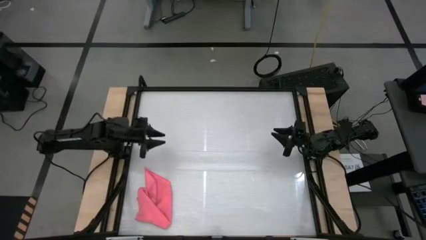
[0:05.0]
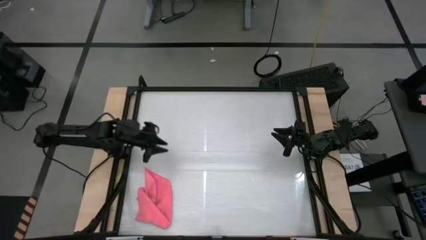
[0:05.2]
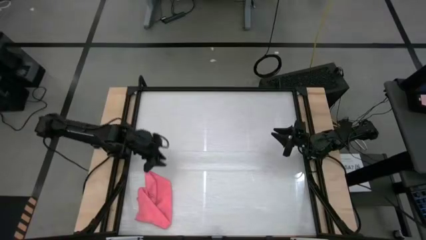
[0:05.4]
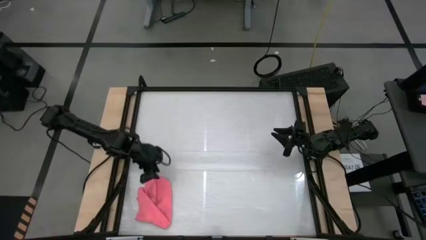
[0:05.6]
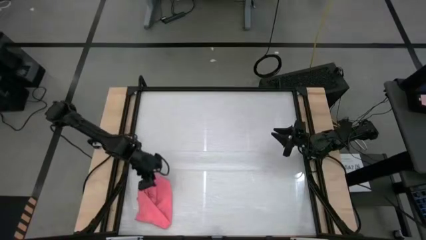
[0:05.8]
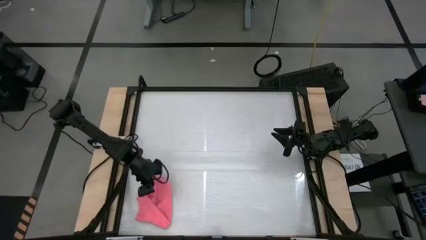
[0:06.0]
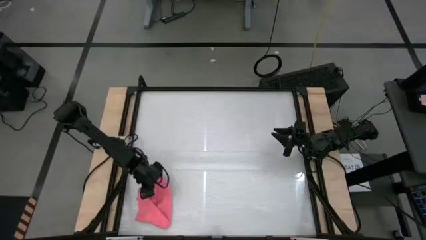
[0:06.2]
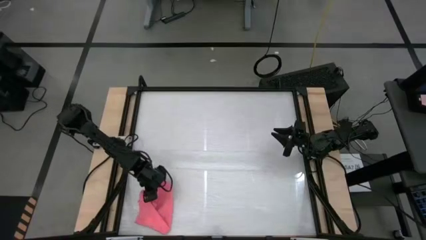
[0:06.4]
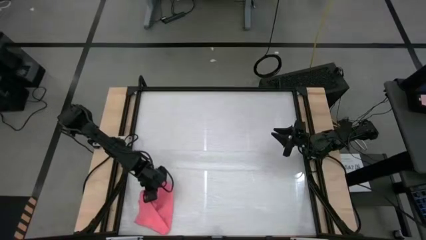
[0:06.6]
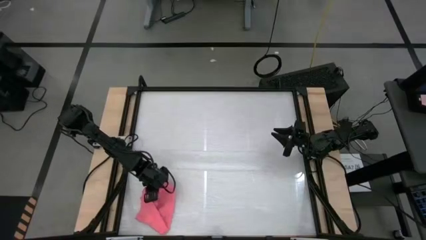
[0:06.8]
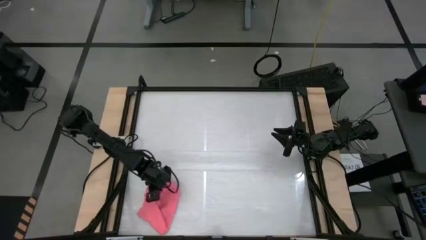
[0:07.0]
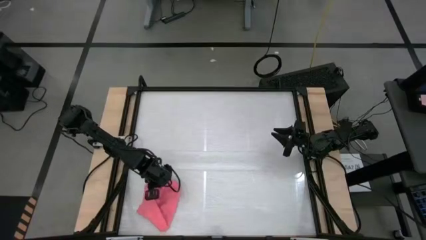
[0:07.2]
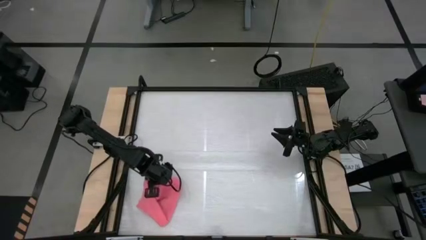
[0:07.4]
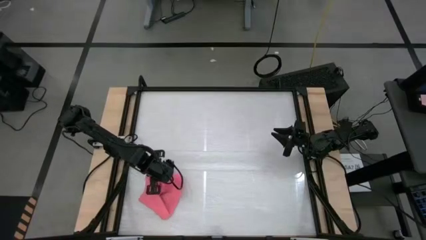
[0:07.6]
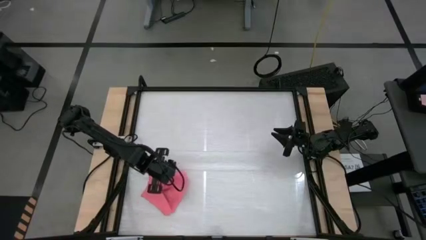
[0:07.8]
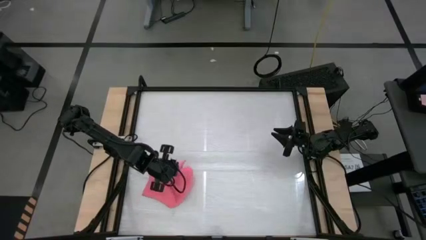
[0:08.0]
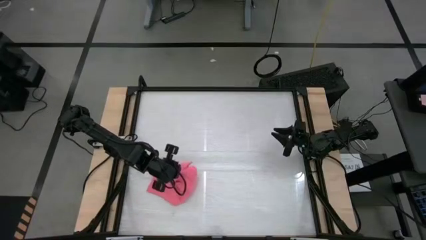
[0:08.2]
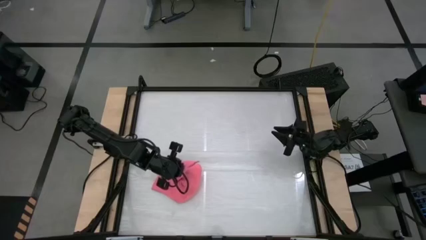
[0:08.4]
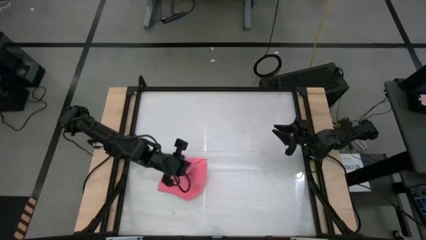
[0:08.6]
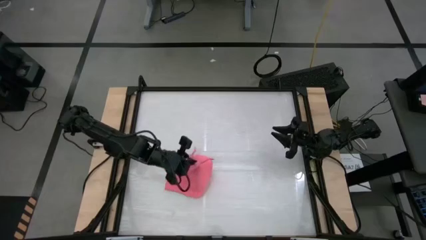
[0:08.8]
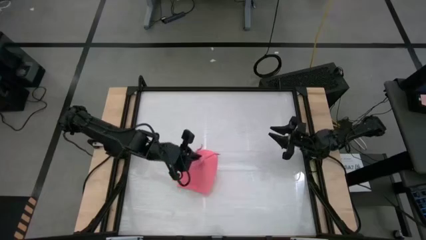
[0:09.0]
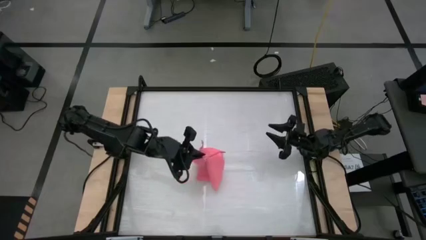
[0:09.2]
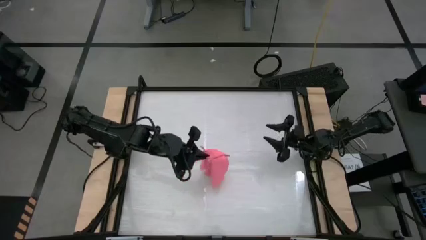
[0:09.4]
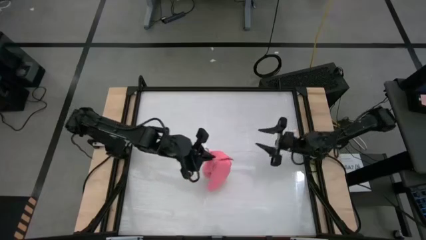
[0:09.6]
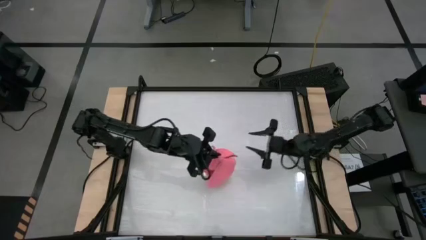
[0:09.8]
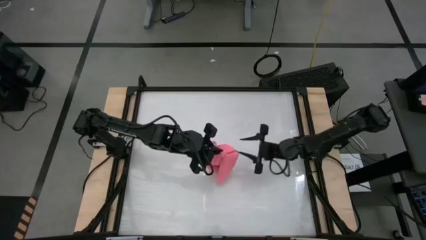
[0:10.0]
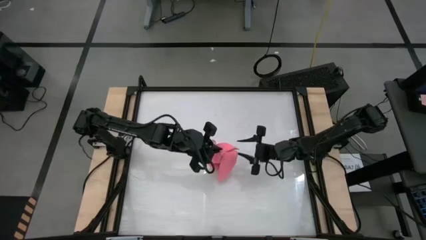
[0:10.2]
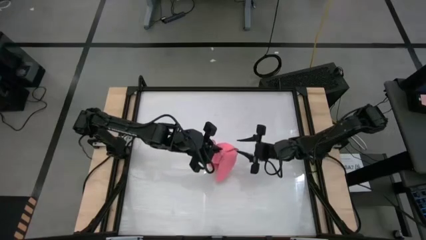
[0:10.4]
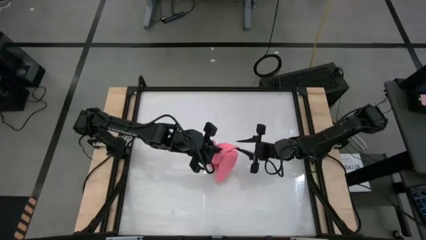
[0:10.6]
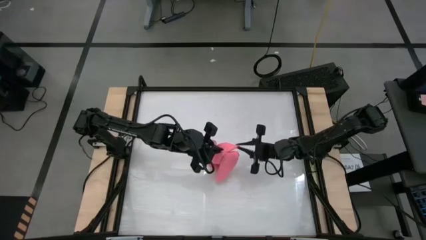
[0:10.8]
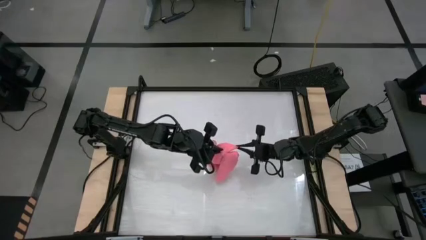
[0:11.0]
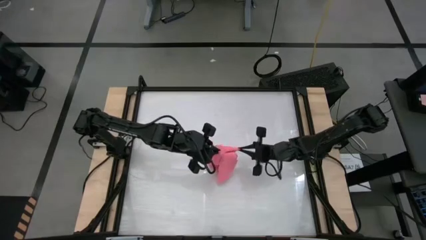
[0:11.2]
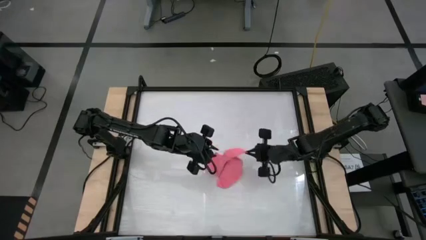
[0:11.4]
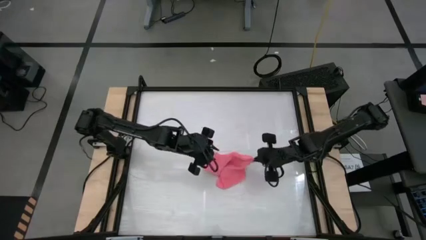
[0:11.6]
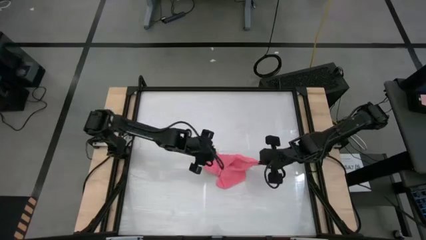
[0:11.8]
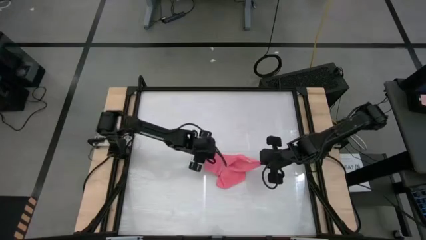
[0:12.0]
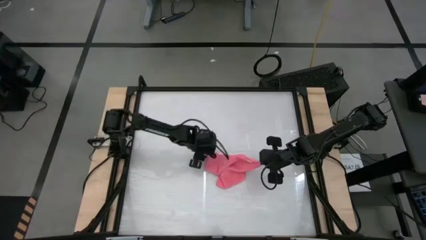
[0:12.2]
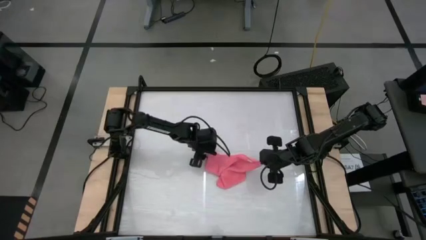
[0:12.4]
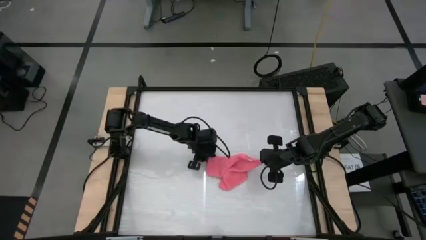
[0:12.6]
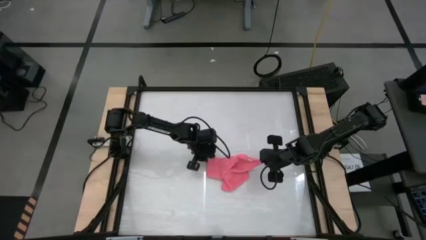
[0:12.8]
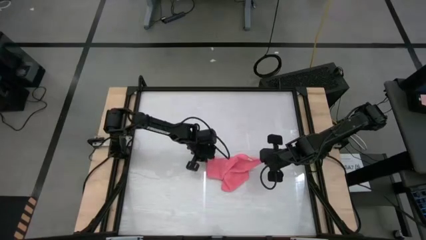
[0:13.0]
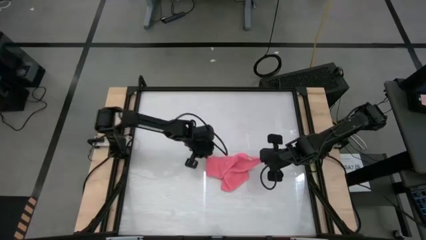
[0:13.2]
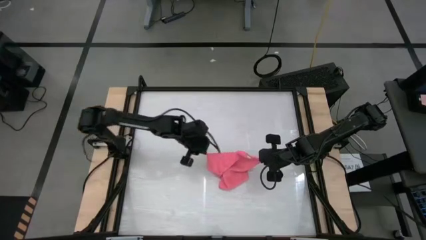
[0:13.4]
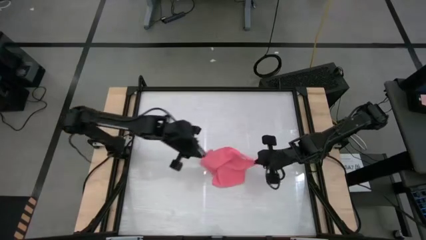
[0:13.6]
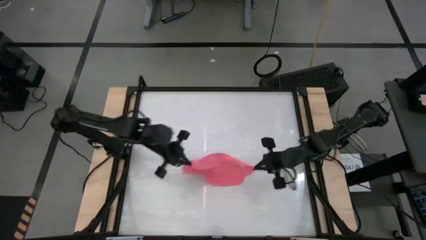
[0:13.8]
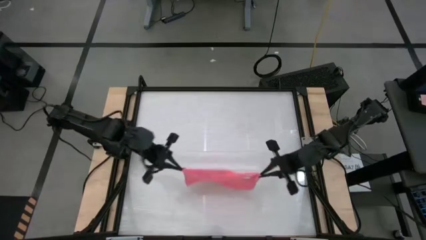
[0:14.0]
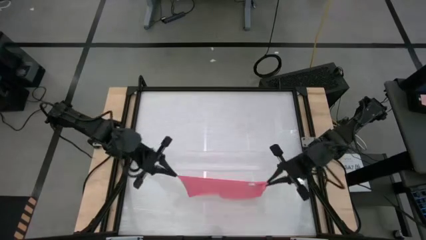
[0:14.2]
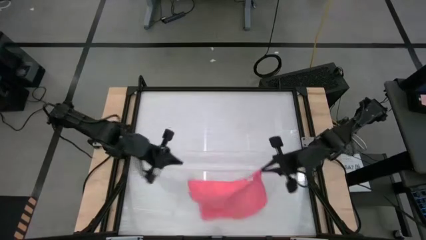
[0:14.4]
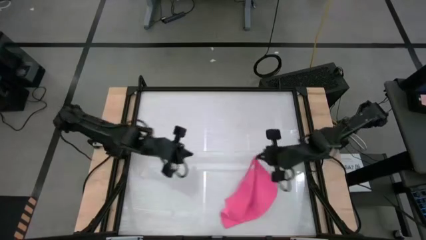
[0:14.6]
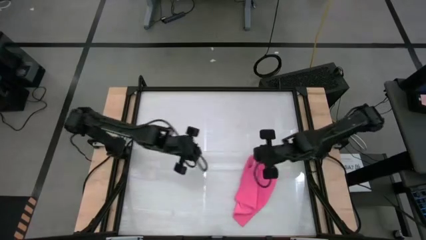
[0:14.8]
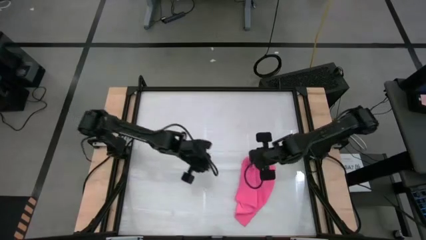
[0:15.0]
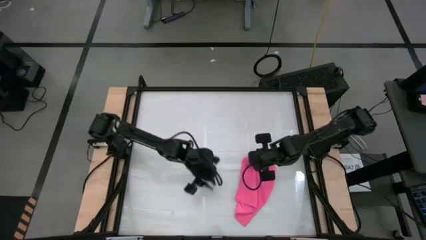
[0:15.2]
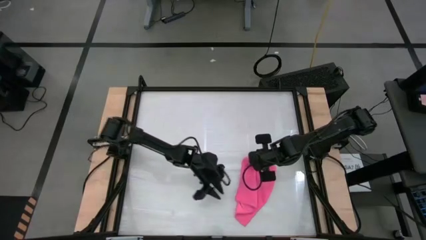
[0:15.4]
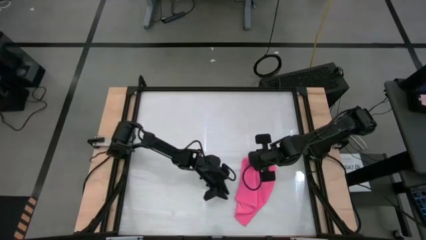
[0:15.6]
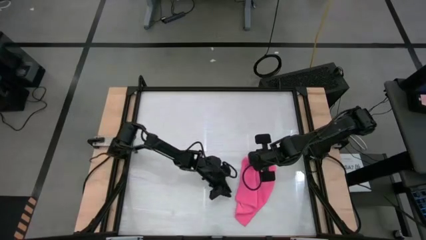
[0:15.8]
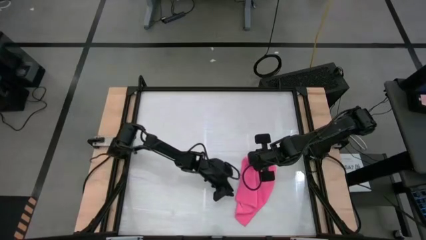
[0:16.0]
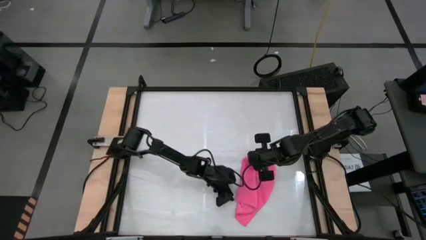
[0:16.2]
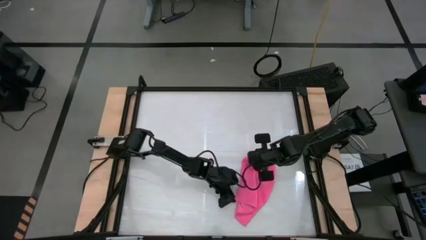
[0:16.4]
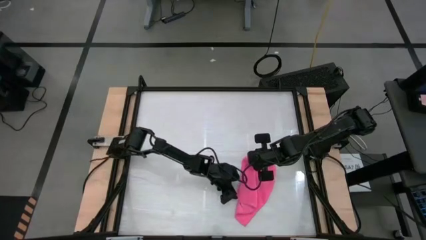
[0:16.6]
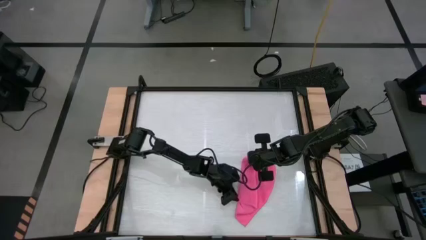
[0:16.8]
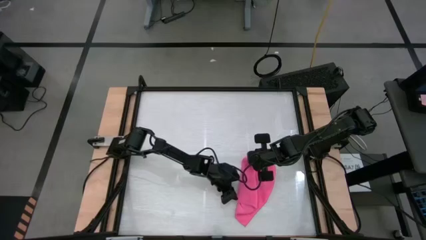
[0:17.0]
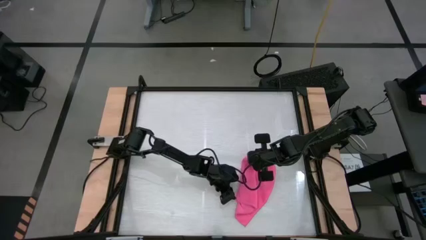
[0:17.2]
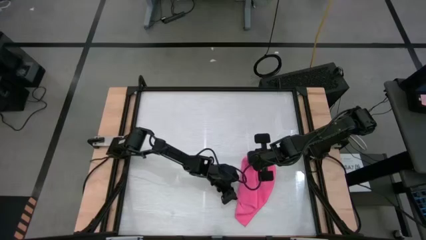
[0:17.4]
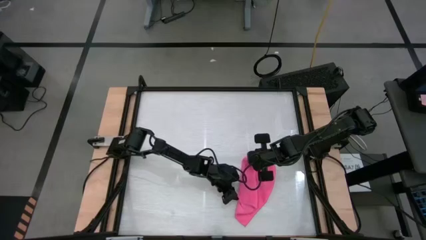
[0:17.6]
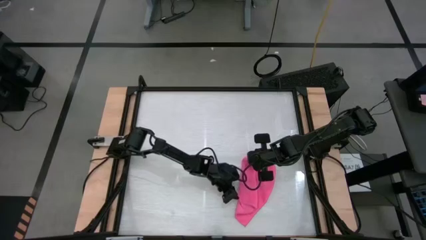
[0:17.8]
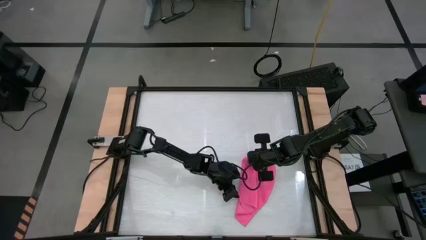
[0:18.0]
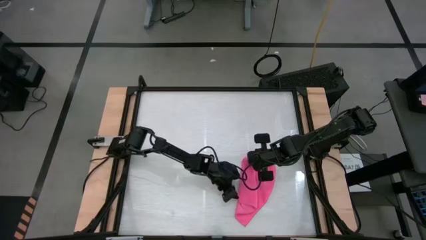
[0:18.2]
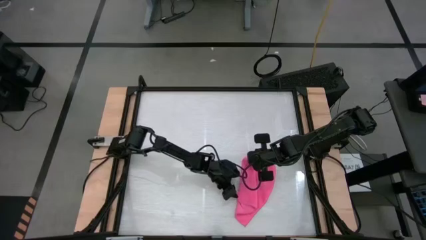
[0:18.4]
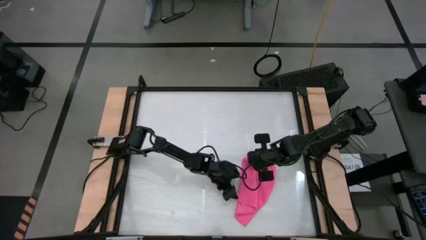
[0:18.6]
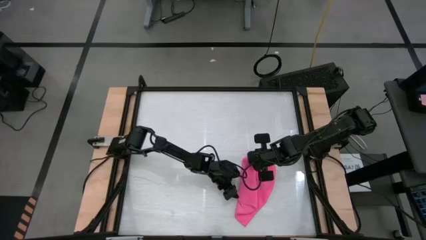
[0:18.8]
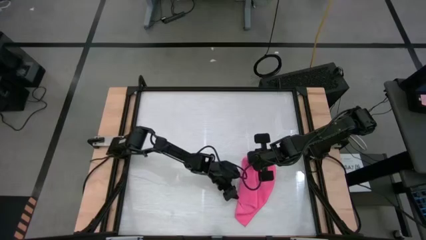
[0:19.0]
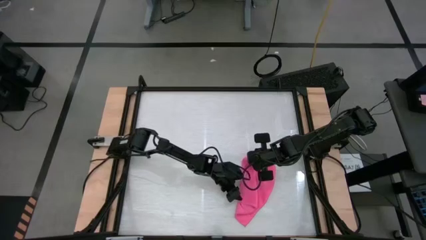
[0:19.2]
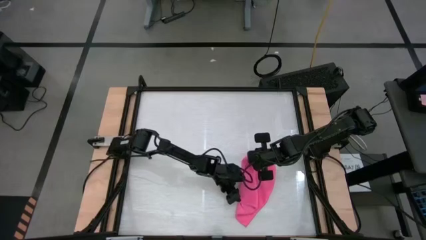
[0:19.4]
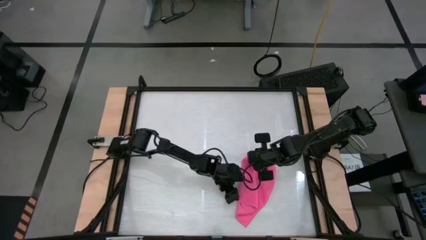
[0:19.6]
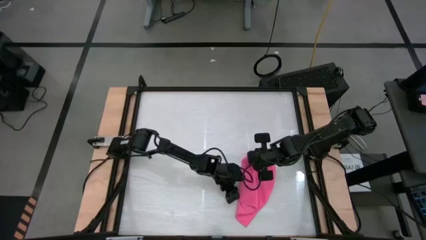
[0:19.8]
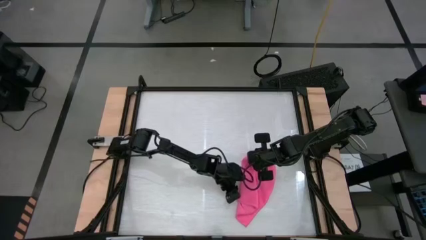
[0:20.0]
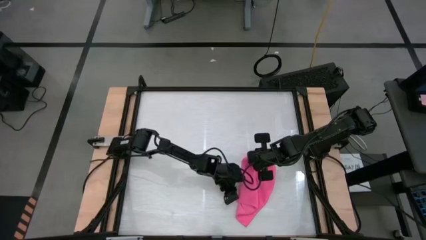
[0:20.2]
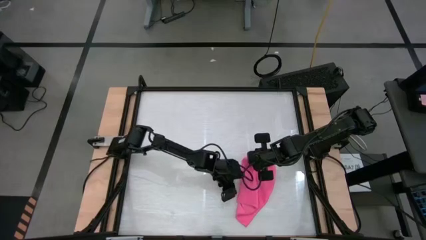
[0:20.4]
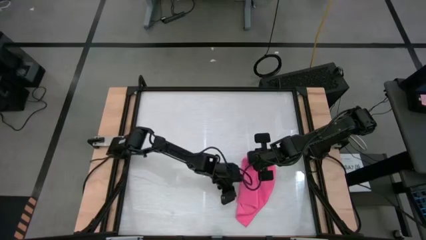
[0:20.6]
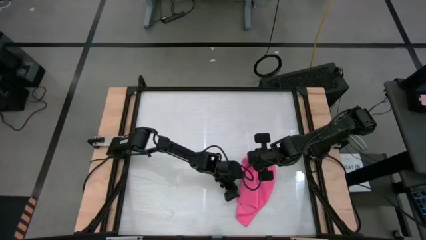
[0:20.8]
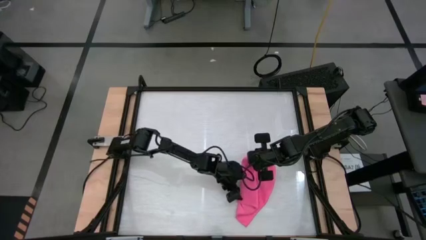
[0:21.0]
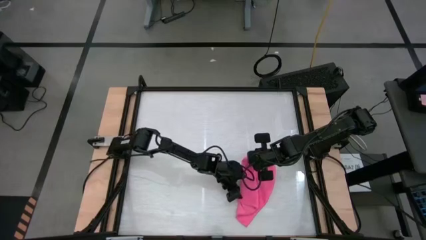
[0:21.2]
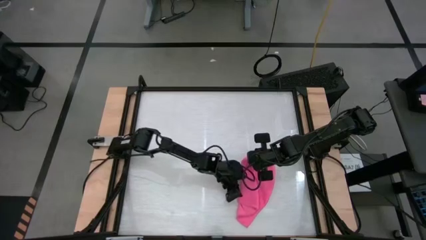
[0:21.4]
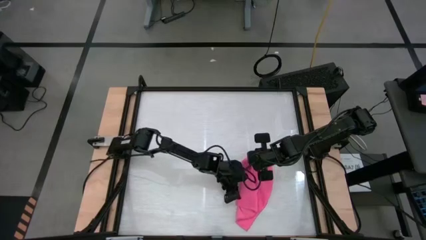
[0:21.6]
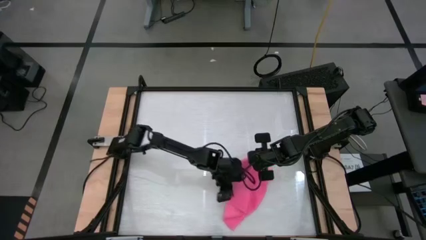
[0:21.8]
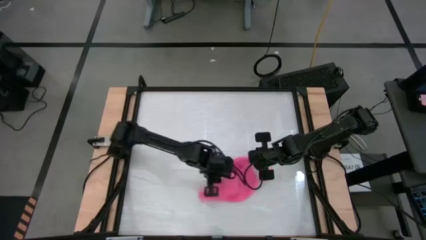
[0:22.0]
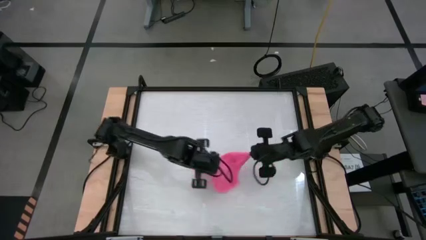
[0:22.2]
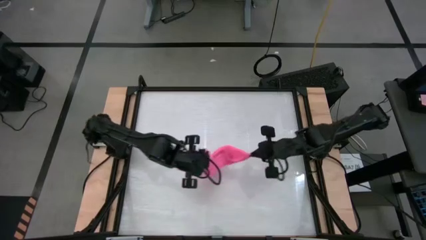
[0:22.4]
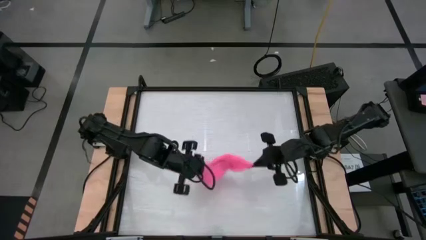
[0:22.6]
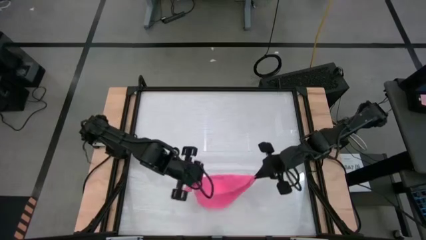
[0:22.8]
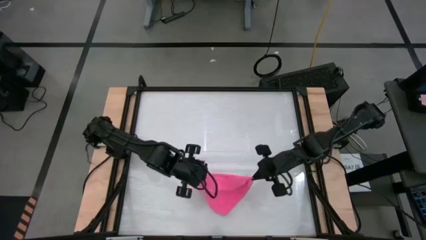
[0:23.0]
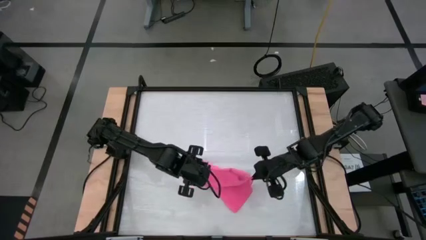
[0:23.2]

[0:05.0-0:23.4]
Task: Roll towel
Fold the pink towel
